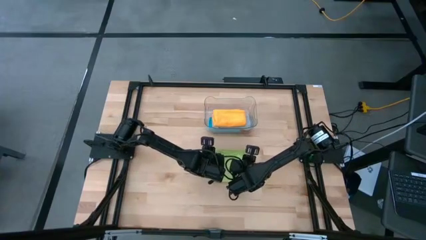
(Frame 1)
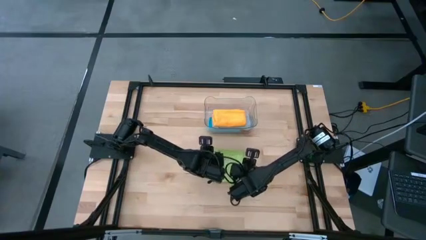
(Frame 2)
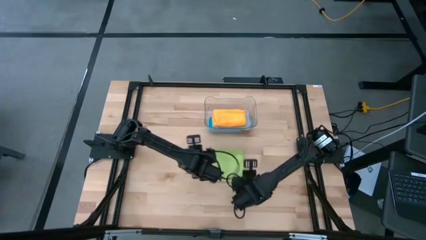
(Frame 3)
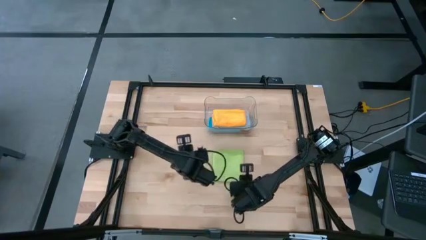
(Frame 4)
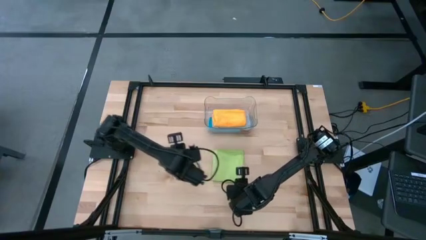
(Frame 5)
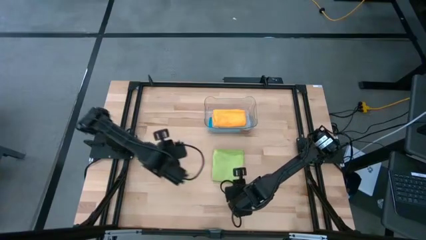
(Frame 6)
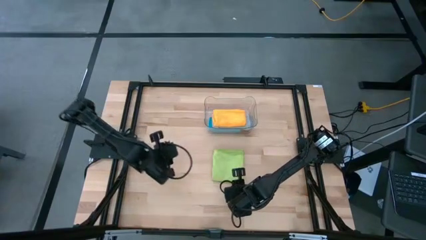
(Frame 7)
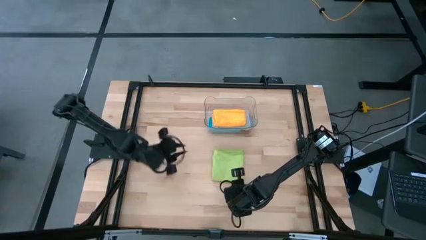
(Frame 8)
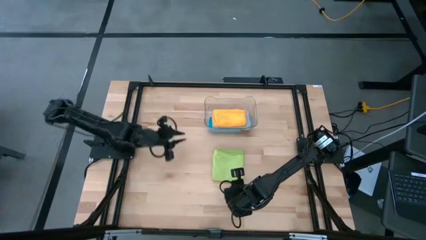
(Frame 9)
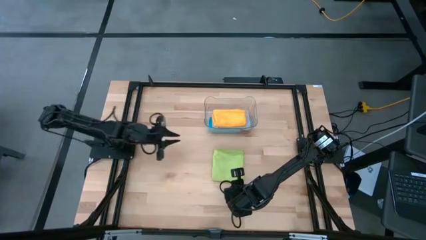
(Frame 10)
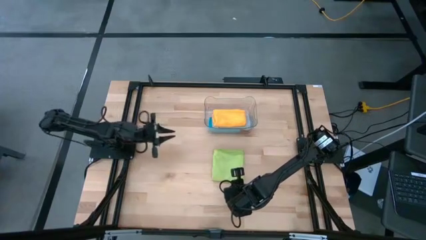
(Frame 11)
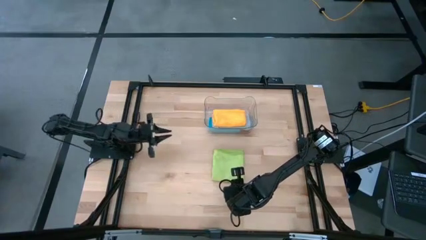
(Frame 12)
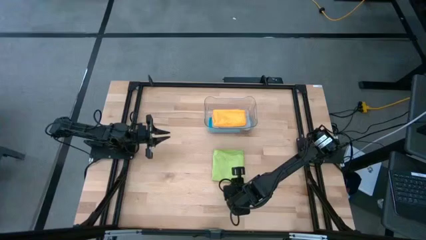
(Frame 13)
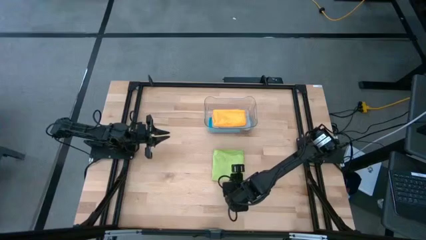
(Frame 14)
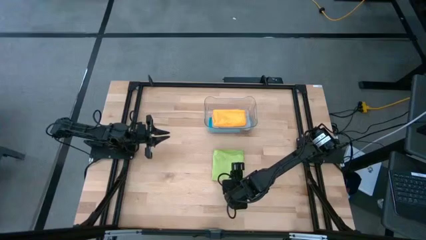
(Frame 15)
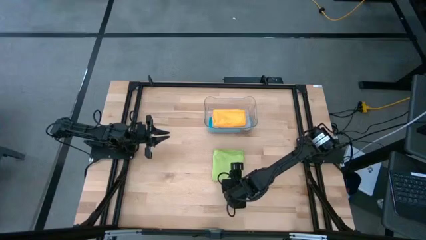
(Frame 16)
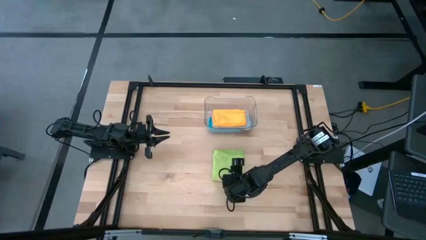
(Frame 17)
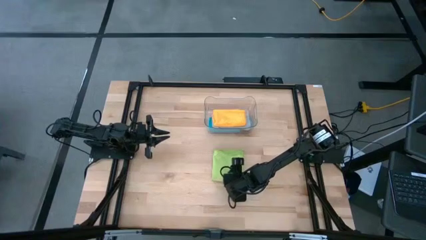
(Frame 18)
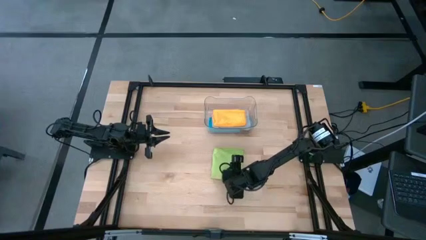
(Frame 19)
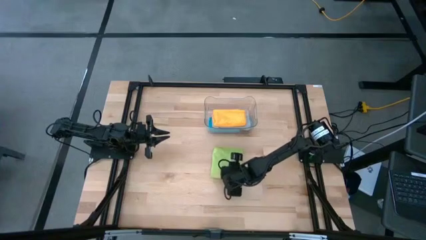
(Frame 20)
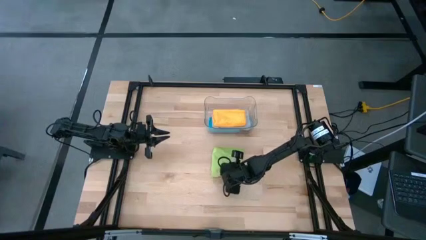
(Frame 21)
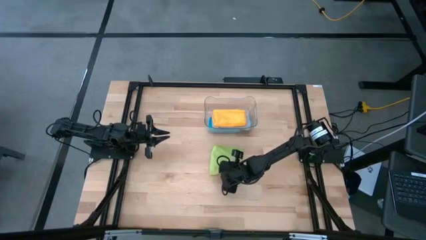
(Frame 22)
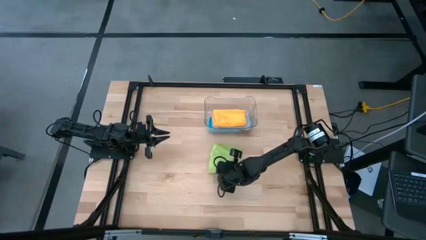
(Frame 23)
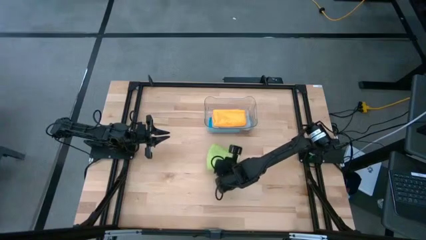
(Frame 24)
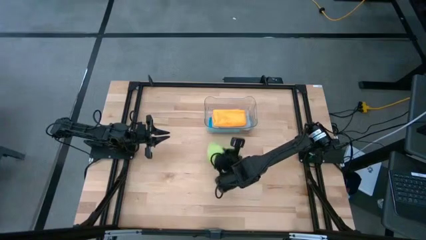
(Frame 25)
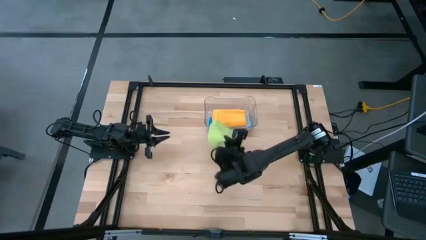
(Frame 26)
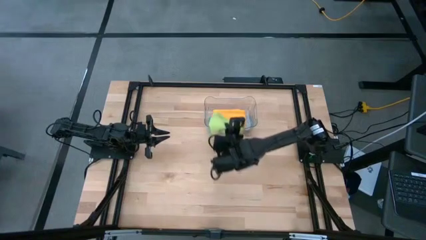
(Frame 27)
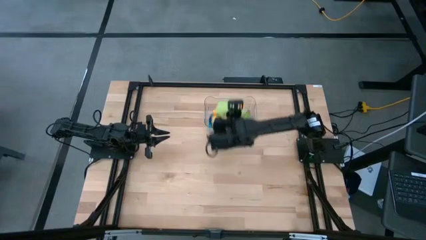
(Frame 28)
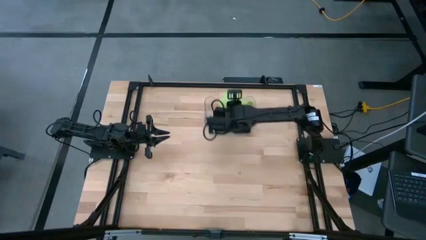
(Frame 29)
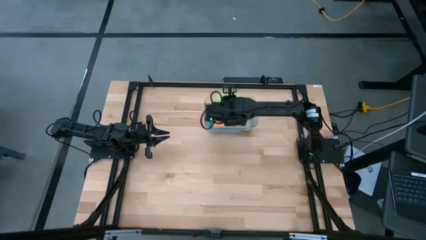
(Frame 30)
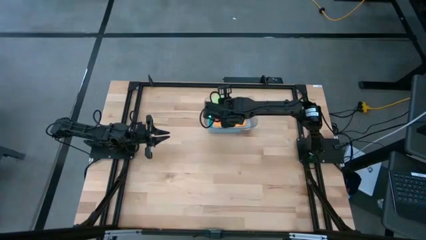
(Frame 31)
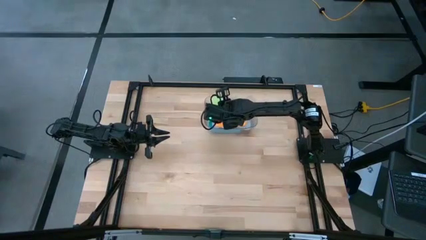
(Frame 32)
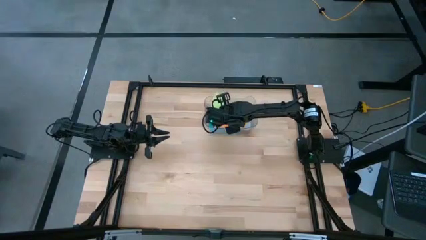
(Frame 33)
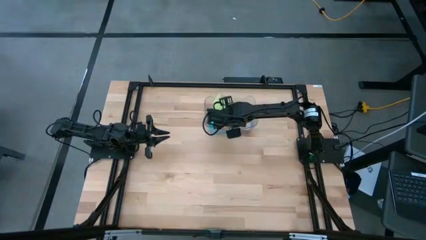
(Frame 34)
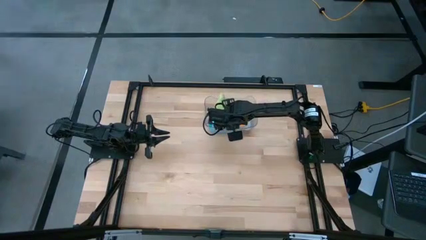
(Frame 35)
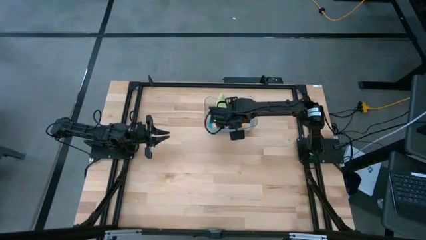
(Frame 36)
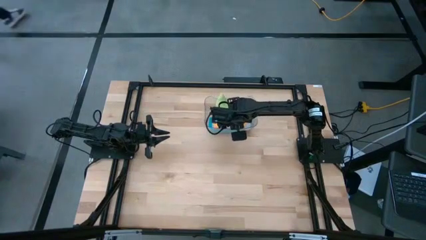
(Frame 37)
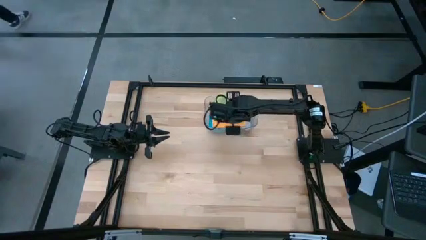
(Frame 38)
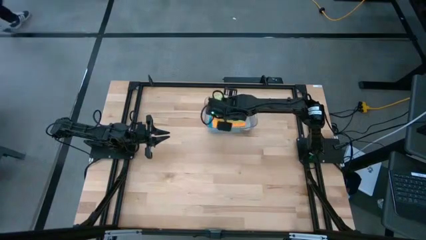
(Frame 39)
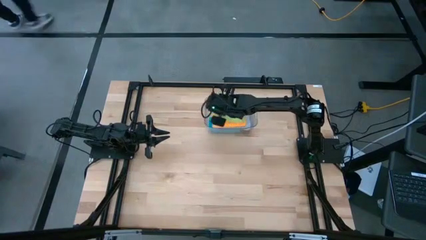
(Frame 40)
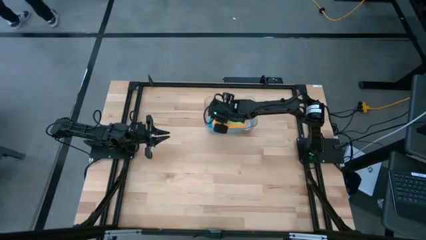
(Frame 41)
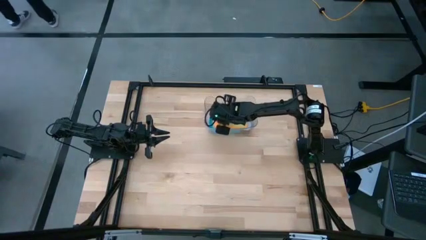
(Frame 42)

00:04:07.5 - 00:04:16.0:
Task: Fold microfiber towels
Put the green towel into the transparent bin

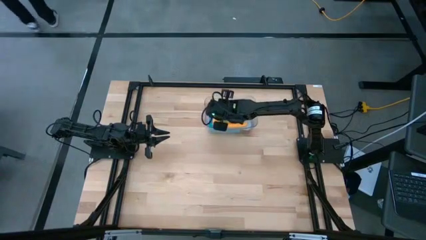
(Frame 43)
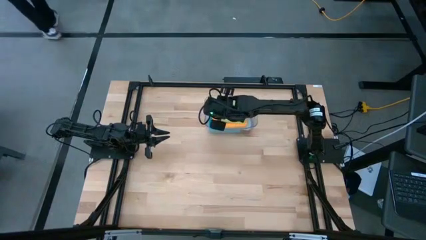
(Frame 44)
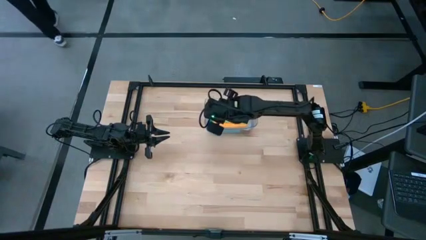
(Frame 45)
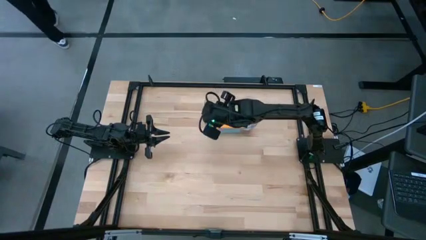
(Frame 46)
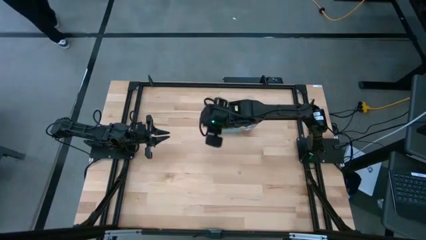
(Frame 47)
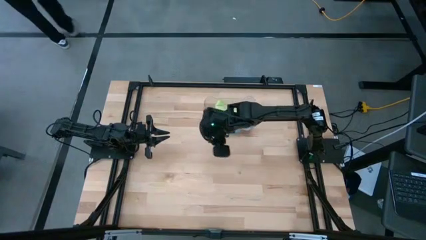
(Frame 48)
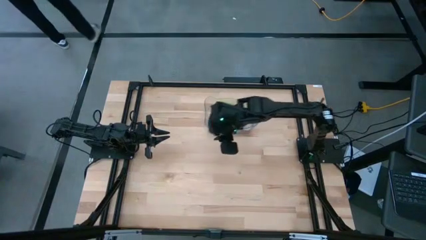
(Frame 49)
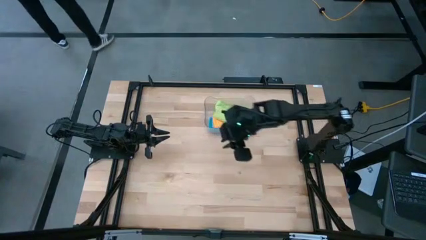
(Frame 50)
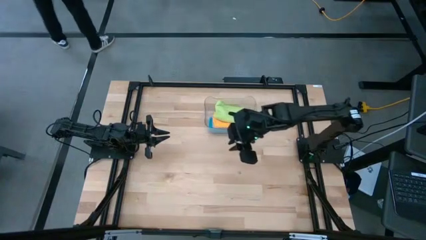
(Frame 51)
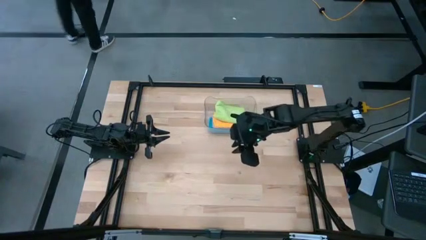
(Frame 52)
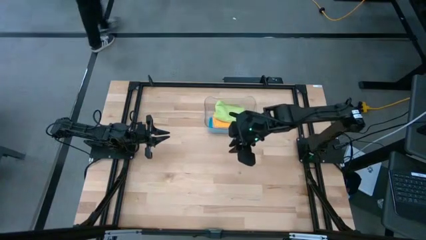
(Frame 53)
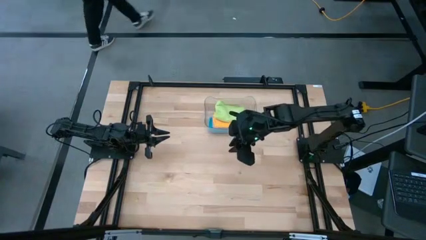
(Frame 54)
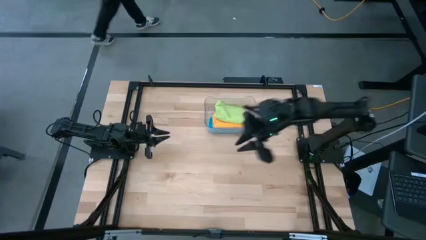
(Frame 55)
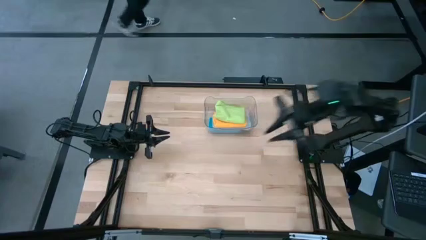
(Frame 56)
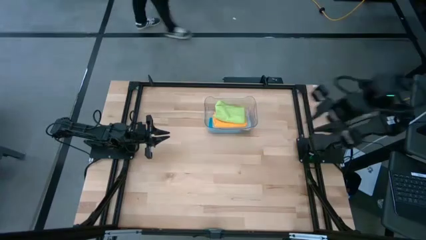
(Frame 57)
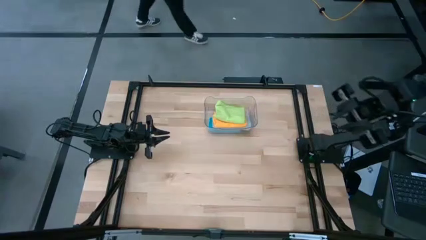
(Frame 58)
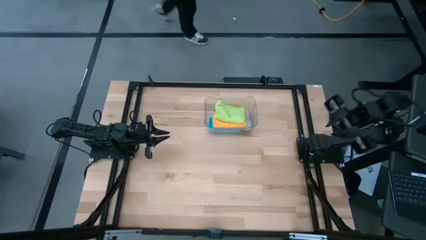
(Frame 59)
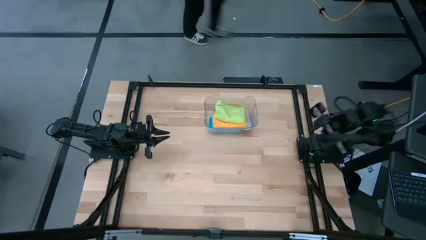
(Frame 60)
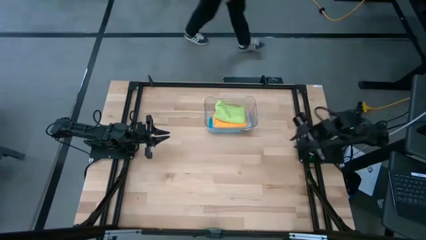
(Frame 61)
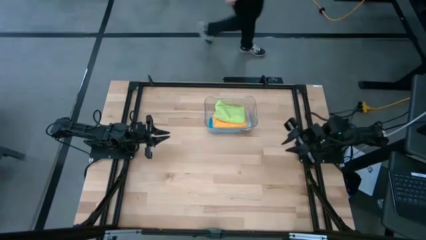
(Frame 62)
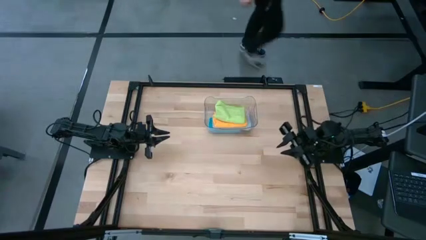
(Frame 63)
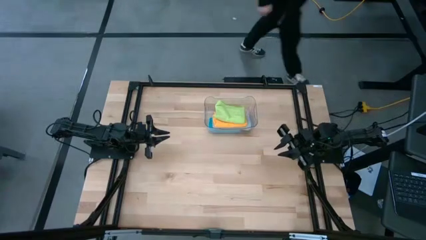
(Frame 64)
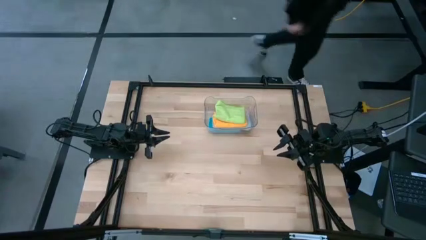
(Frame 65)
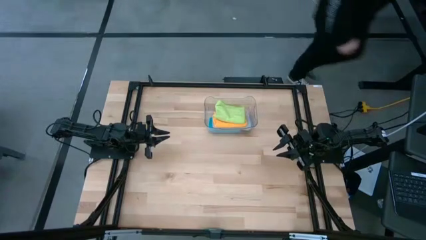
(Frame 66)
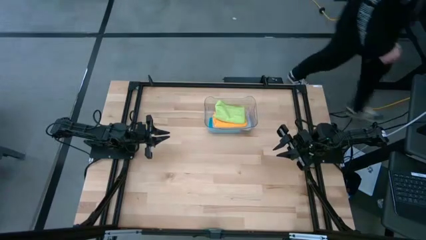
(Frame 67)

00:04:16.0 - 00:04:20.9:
Return to Home Position

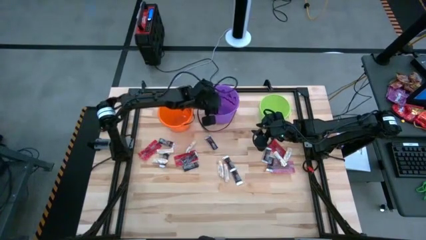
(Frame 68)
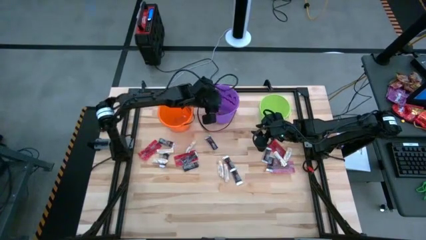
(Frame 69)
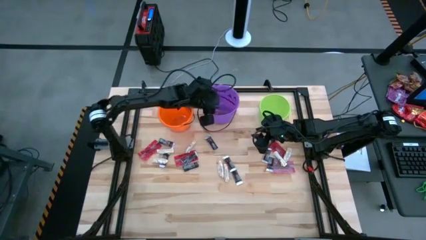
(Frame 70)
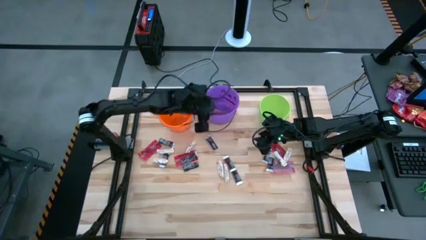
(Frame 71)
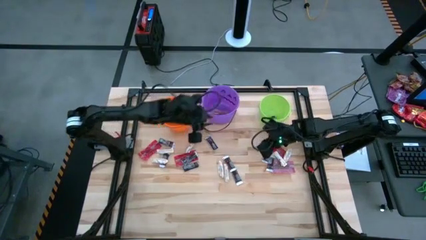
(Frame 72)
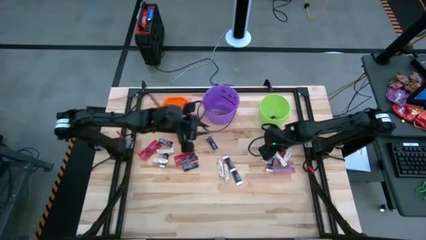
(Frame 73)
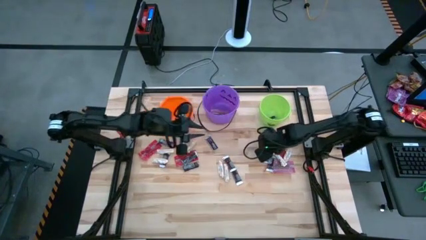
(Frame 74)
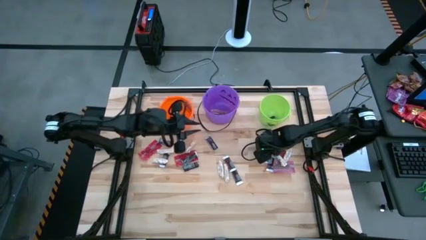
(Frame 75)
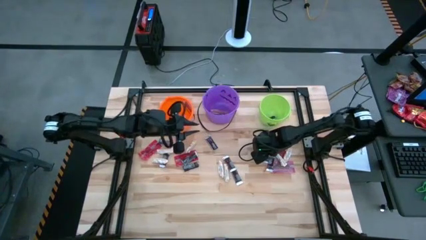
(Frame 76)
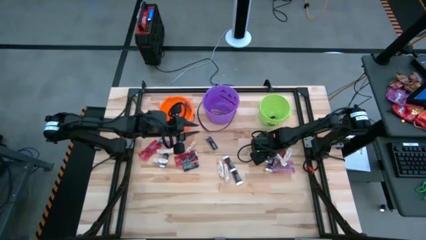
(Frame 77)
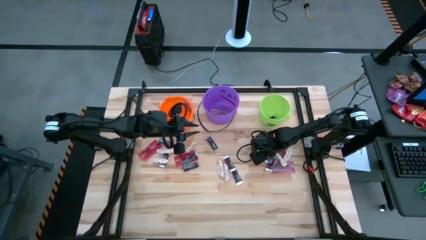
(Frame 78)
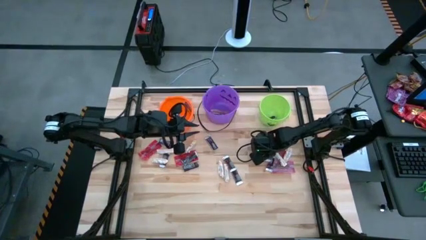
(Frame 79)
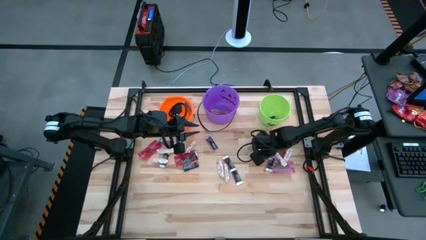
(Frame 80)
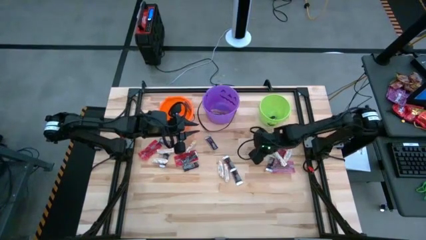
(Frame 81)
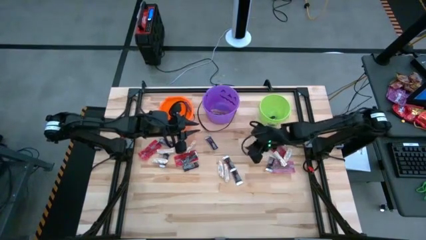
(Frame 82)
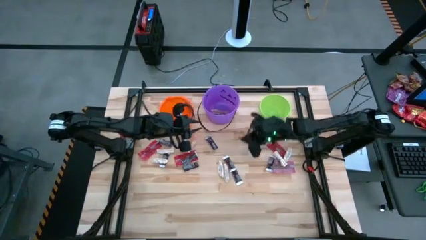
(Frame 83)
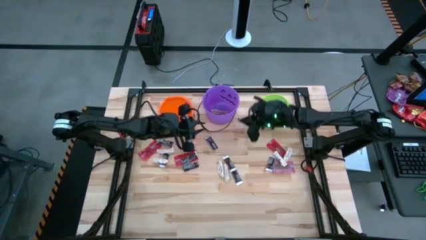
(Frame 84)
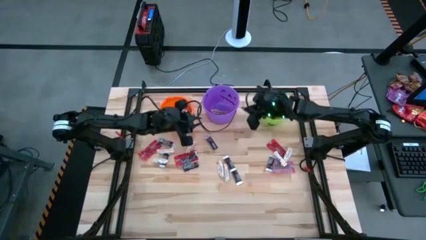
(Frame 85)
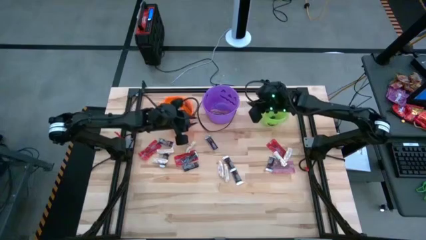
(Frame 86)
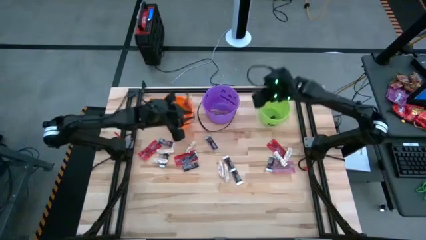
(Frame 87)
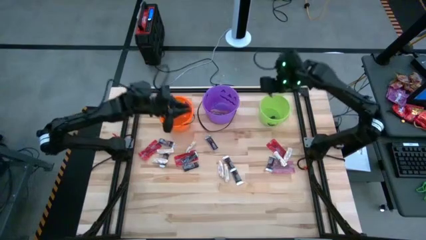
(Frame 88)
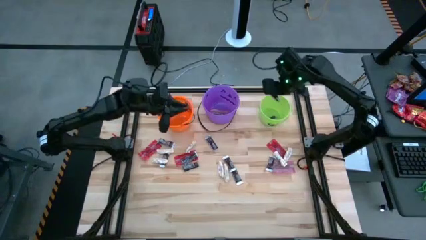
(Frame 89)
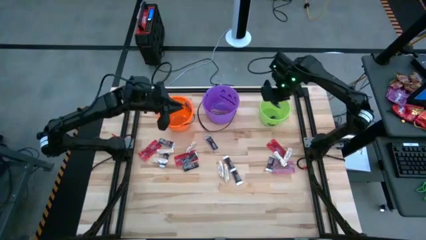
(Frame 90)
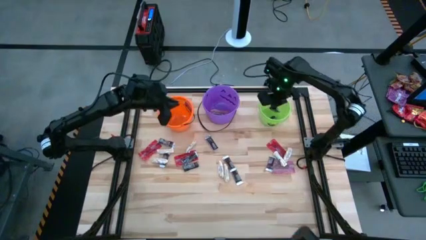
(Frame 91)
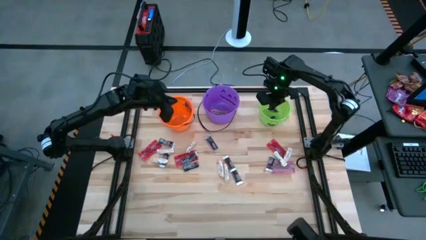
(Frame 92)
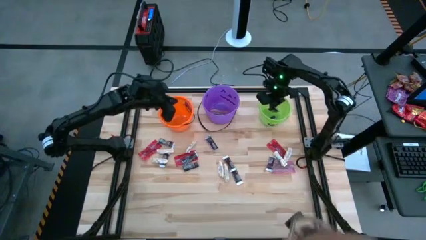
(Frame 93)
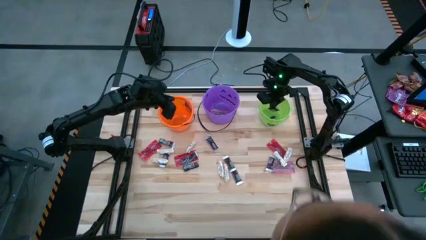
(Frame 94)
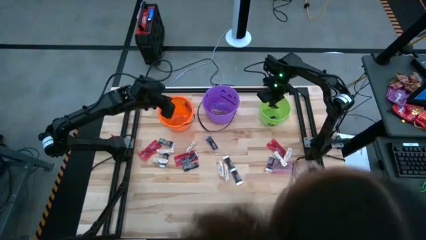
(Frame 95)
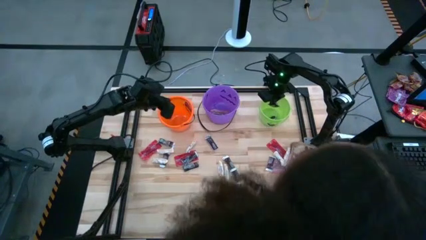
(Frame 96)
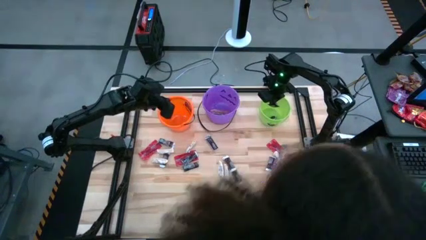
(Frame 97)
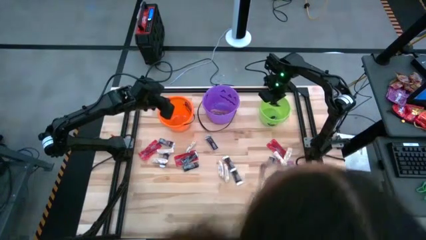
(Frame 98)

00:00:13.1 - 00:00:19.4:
Task: Sort candy by brand, put in halloween buckets
Put the brown chocolate bar into the green bucket
